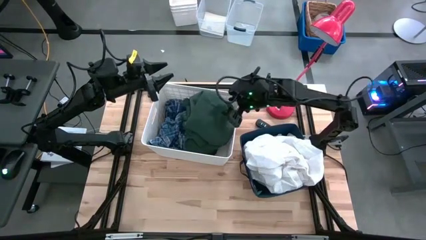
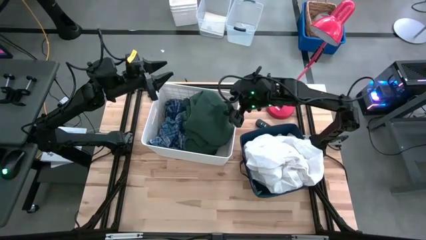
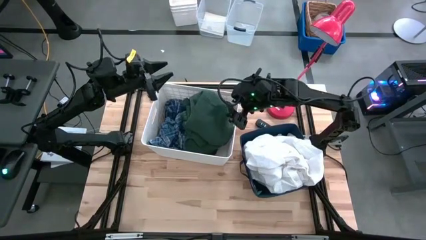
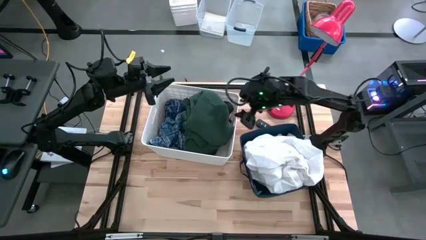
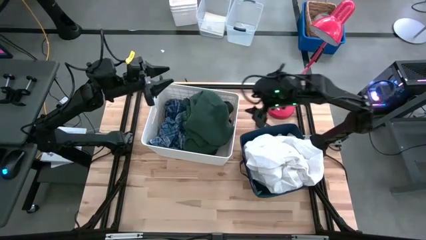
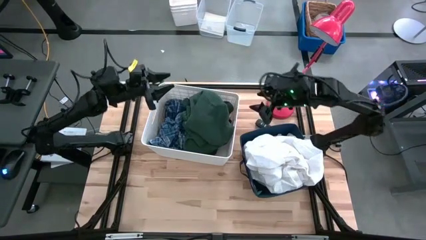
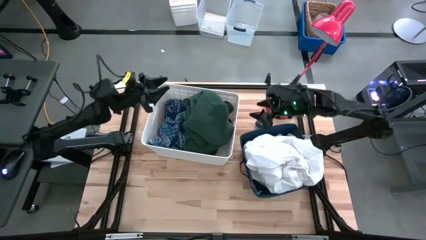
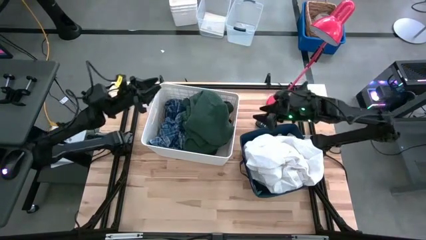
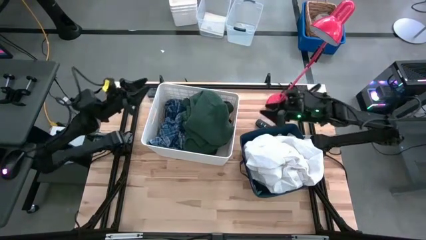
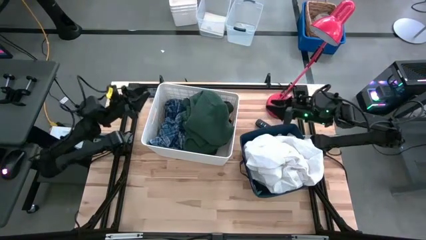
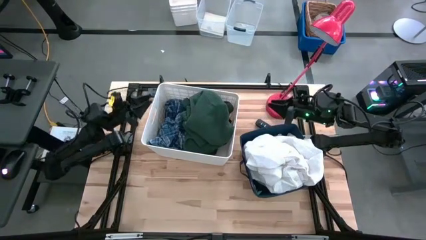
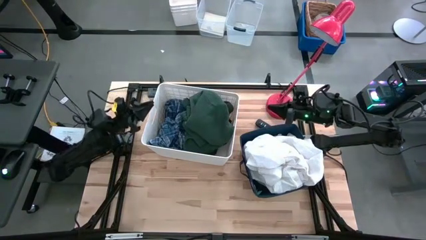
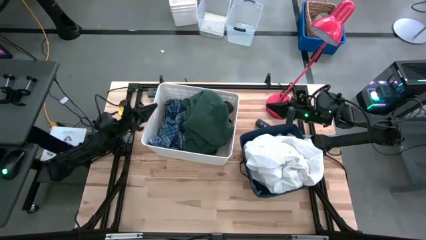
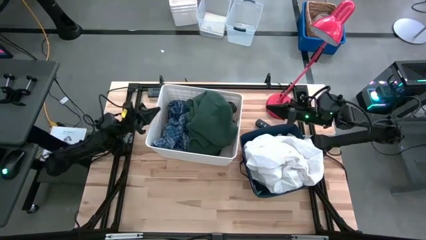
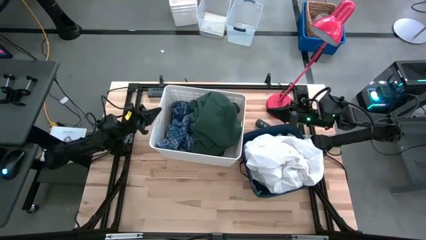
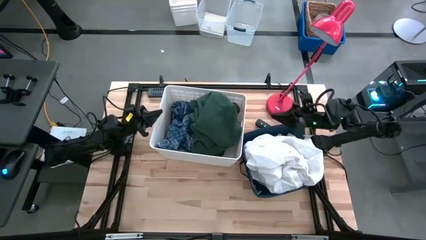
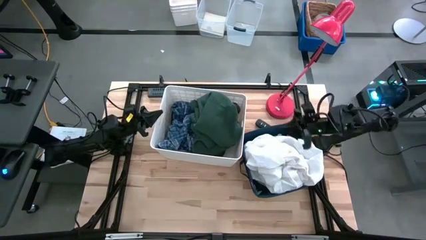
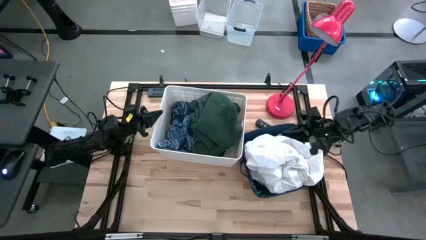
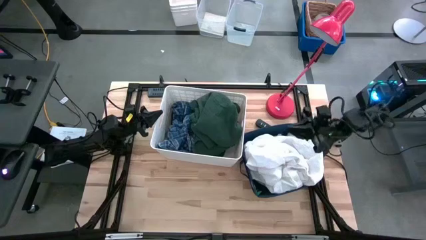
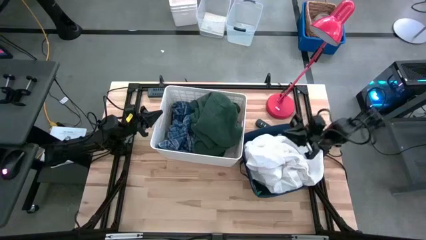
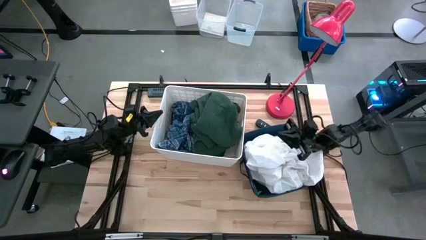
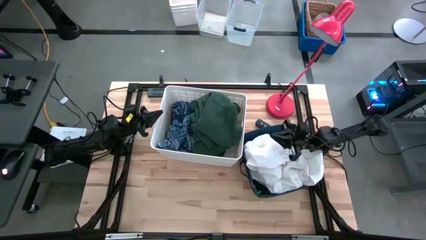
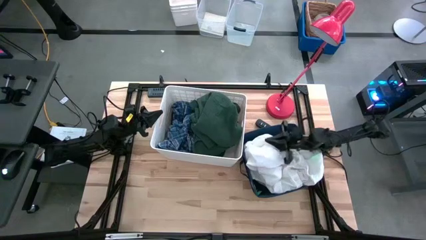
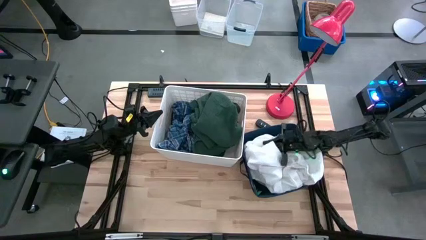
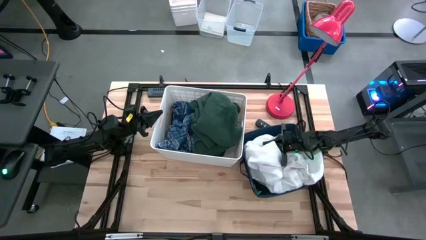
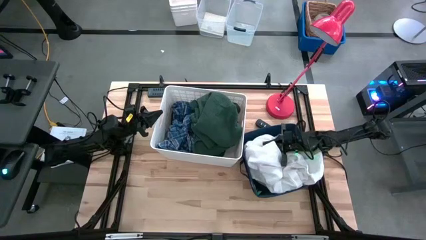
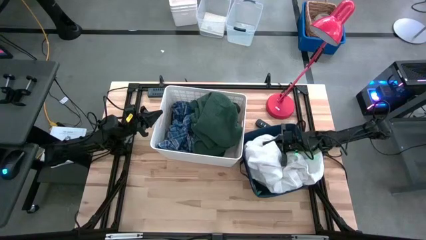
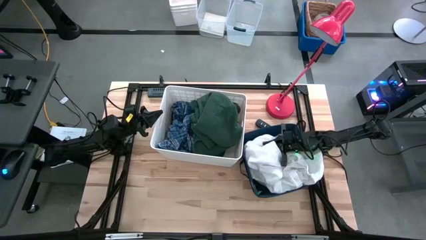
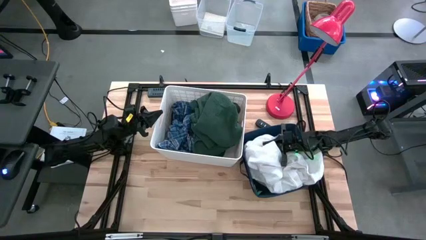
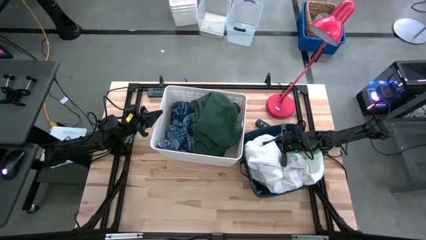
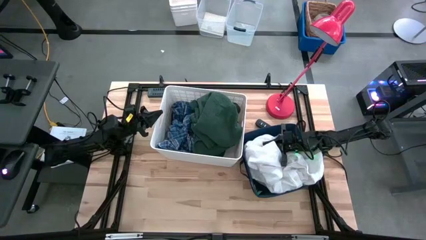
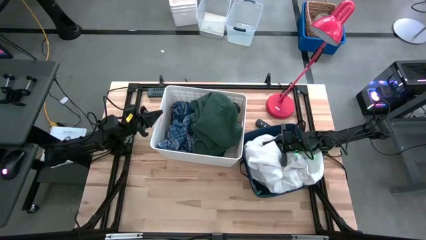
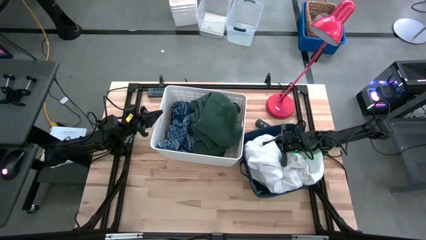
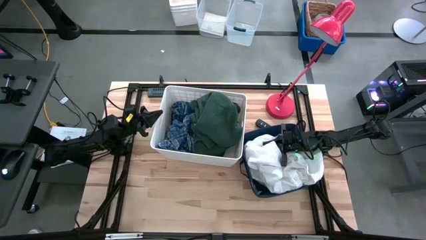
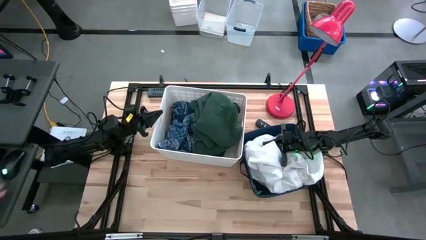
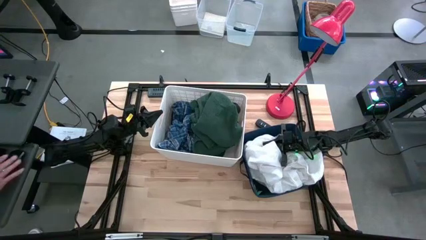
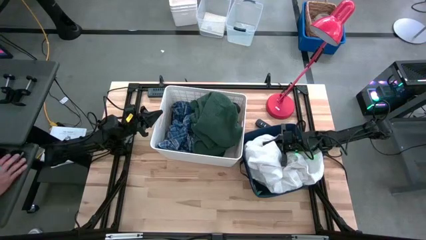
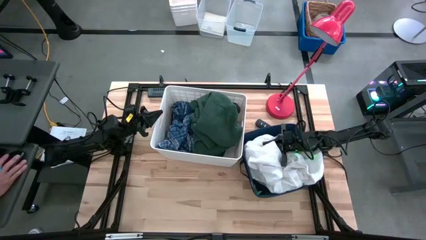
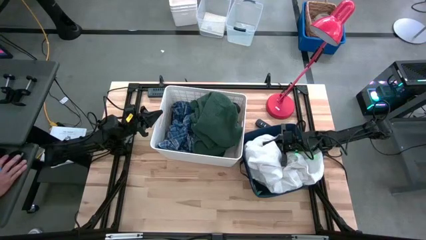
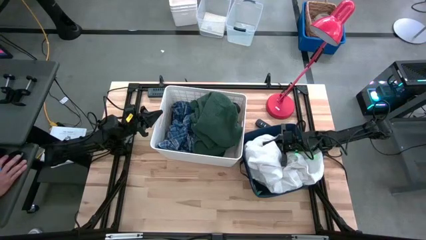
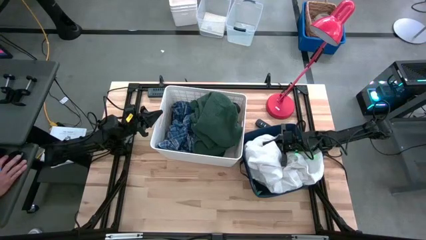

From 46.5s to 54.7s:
Task: Sort clothes
Return to Home Position

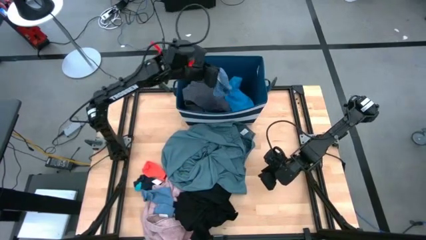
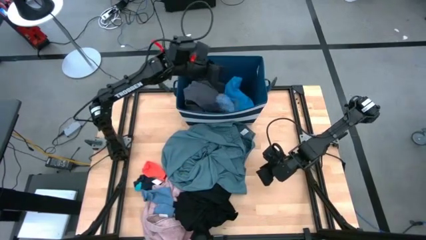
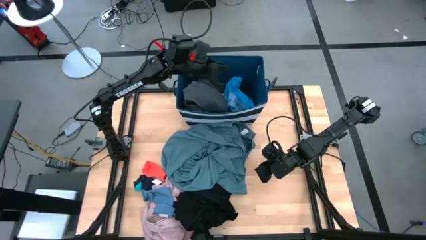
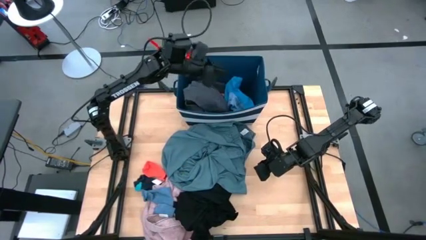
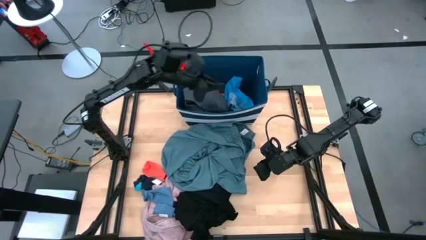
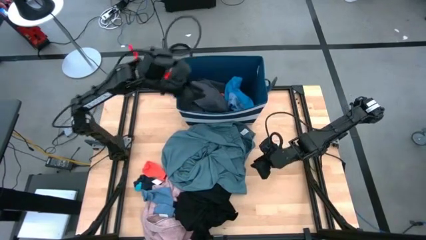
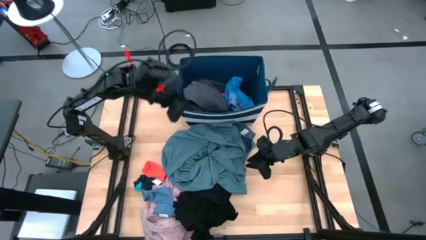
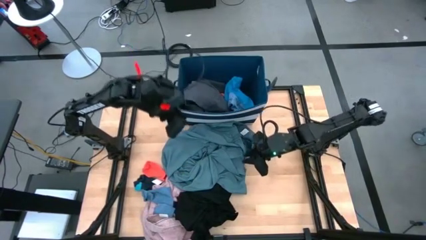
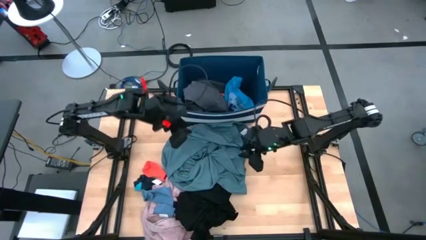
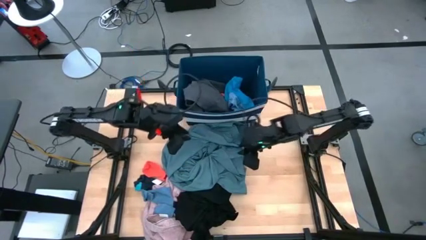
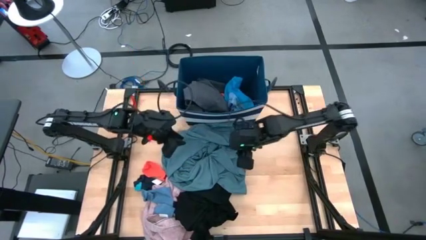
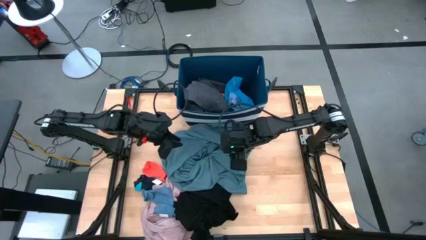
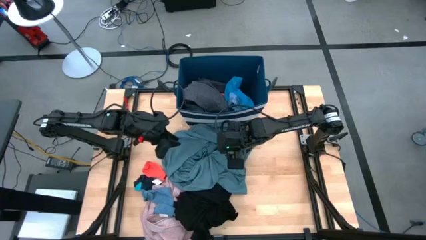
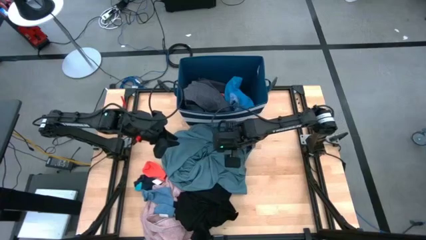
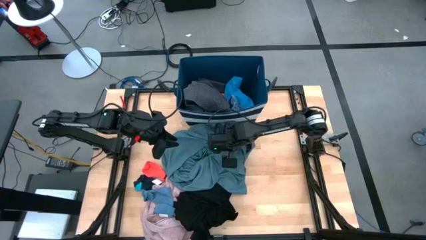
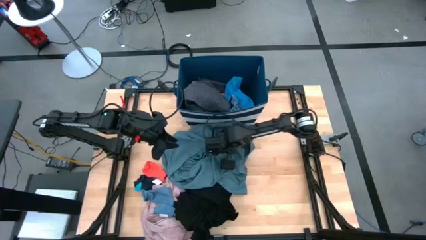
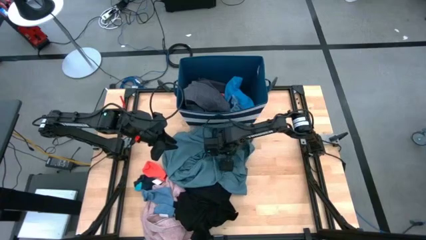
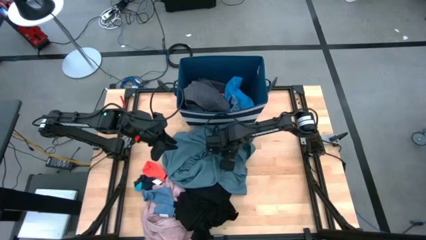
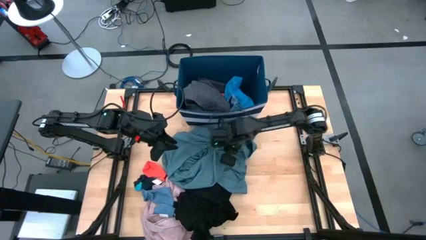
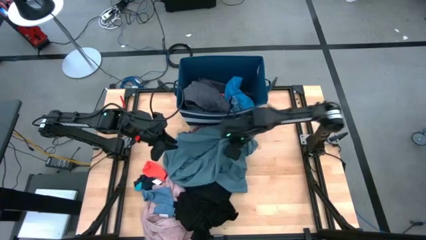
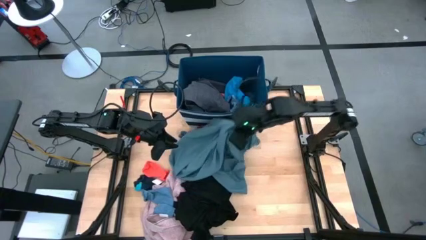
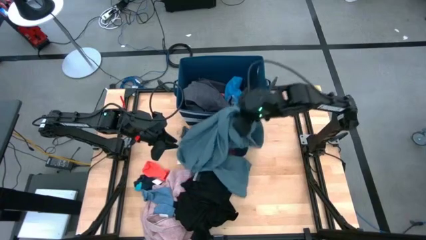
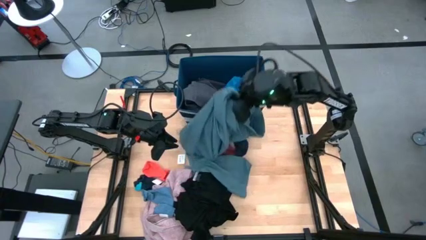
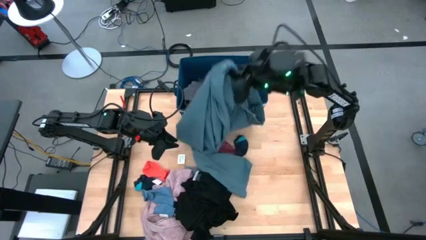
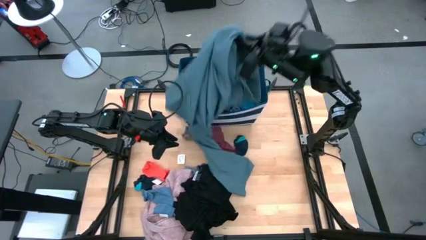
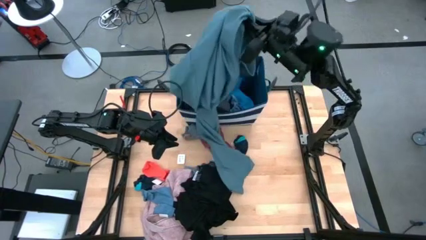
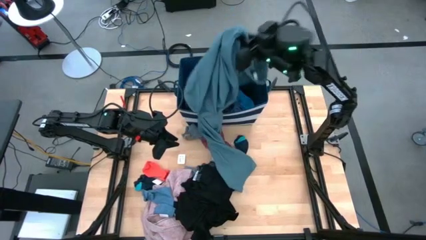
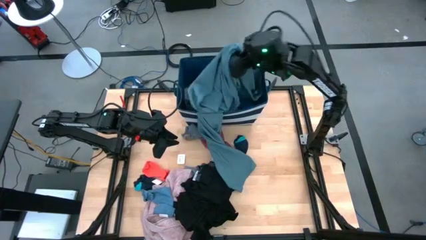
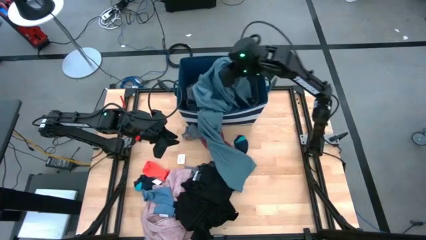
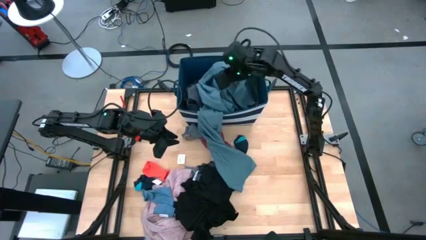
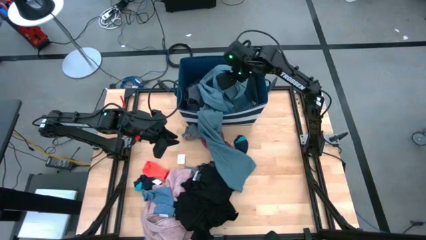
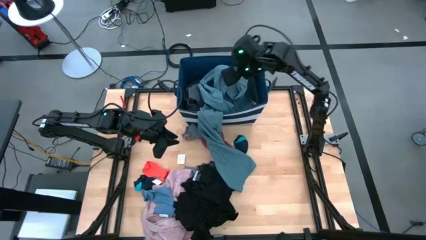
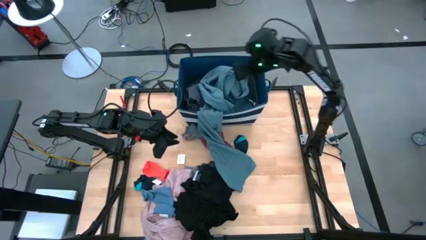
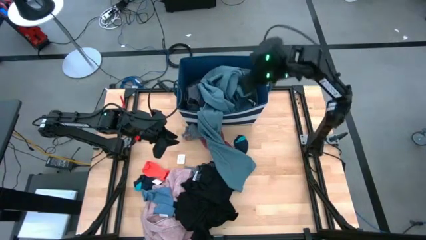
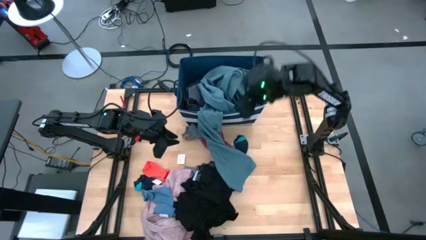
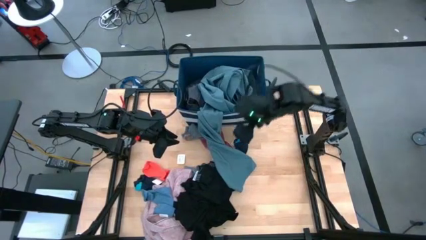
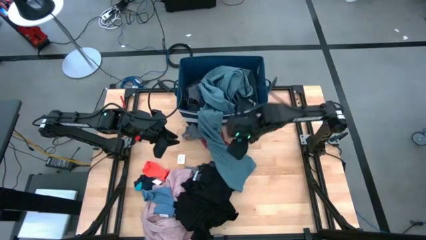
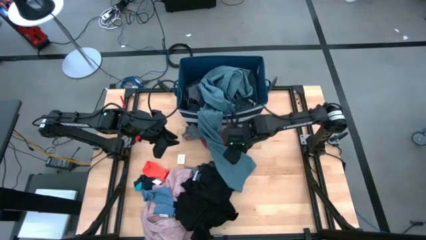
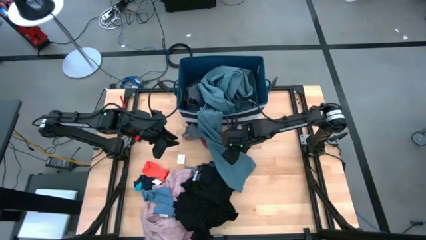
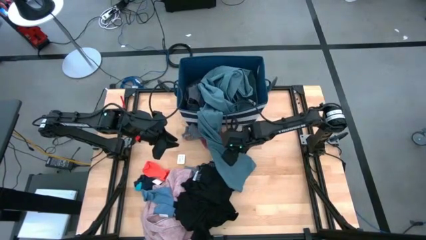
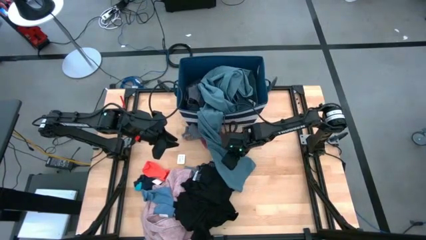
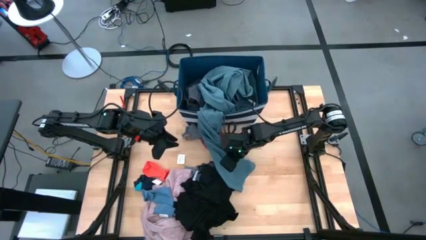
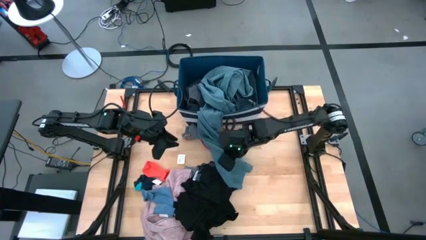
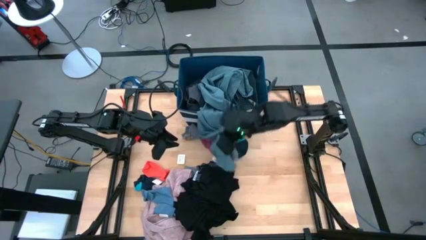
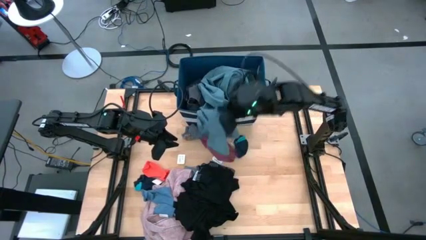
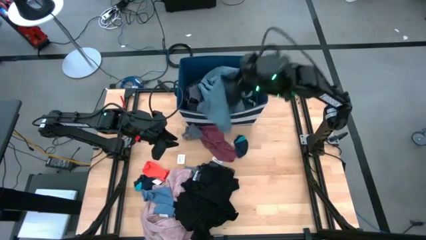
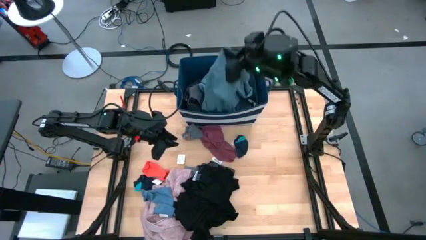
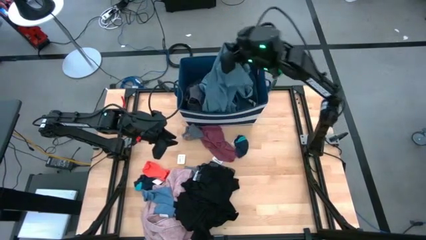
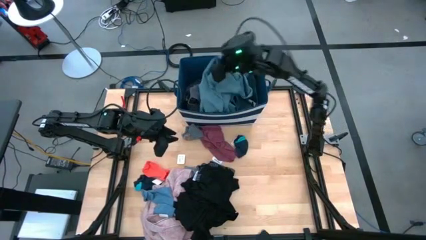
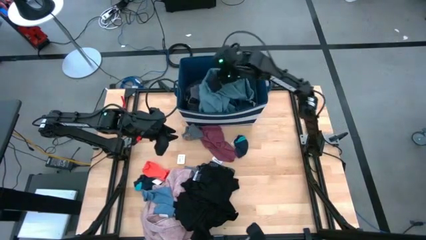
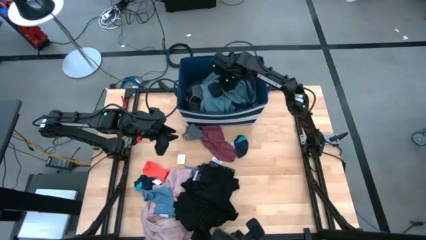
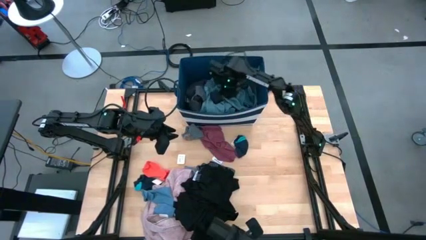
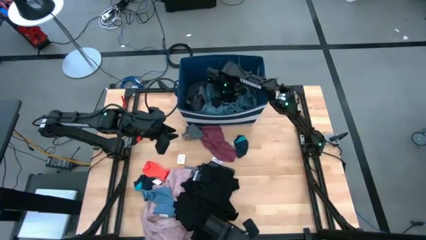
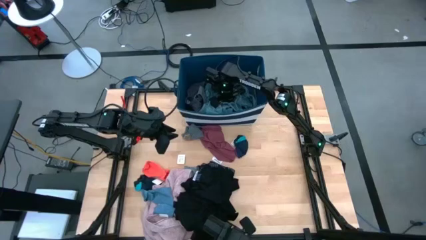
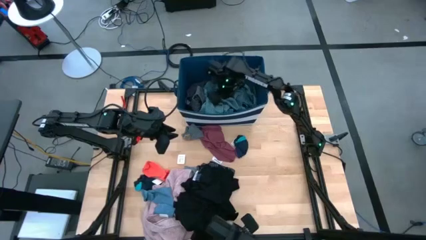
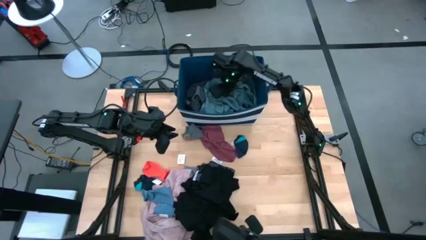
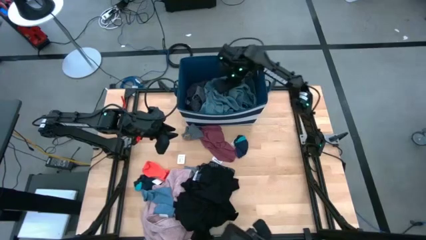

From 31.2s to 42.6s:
Task: Sort clothes
Put the green pants into the blue bin
